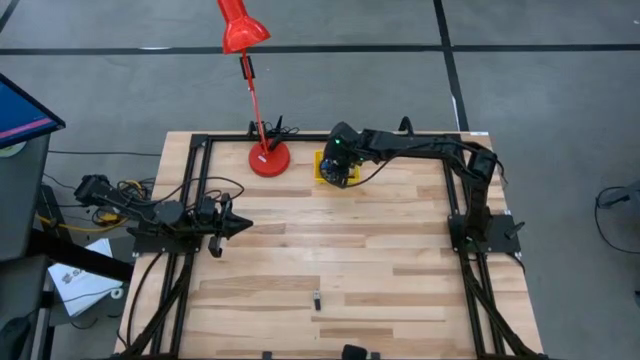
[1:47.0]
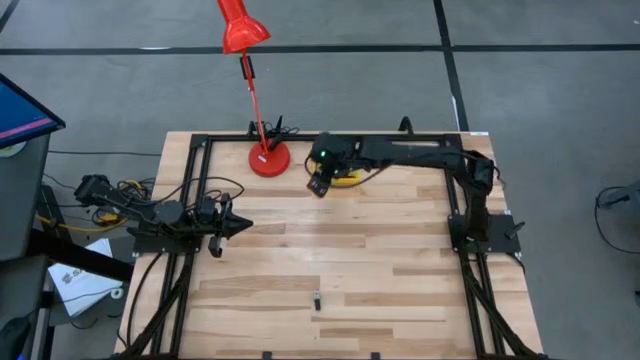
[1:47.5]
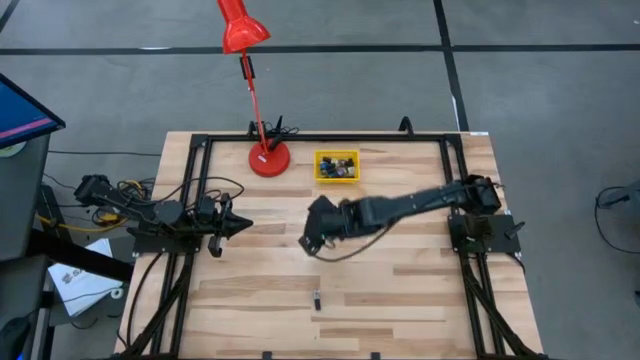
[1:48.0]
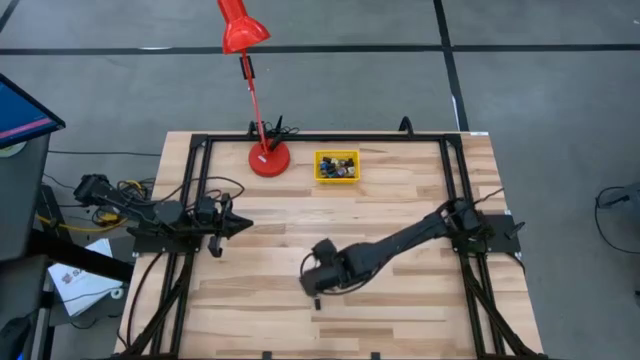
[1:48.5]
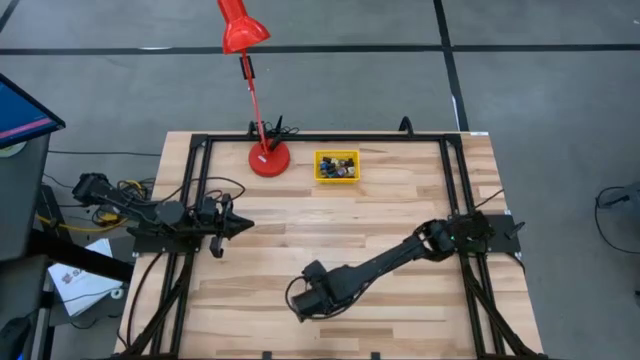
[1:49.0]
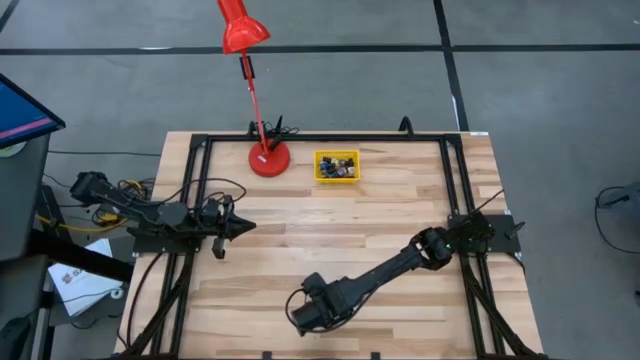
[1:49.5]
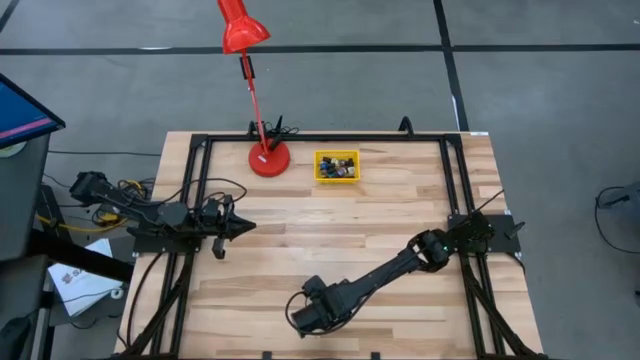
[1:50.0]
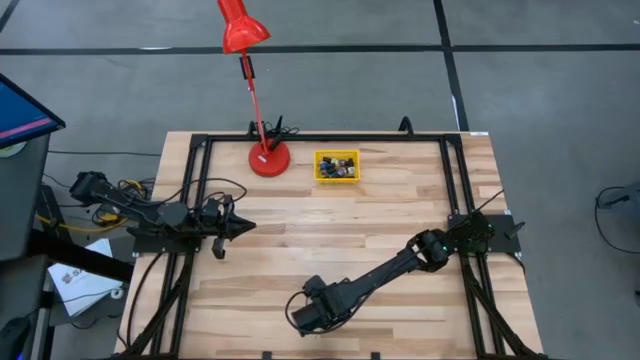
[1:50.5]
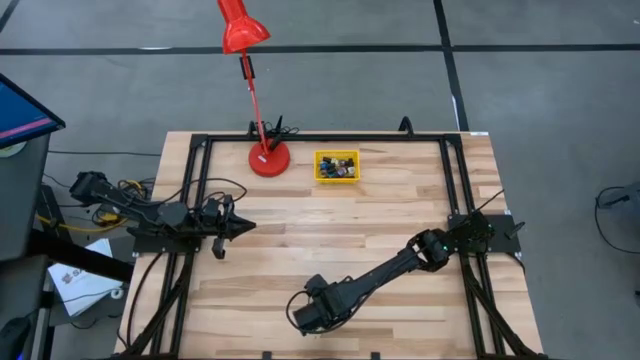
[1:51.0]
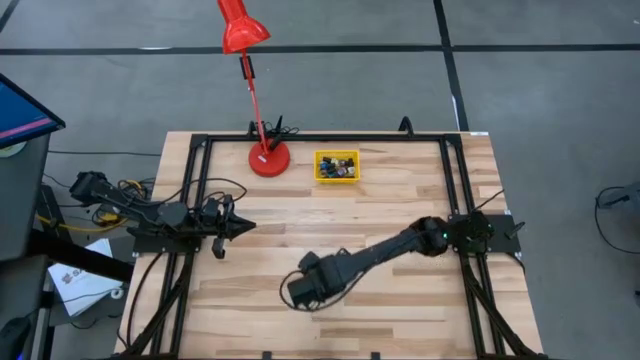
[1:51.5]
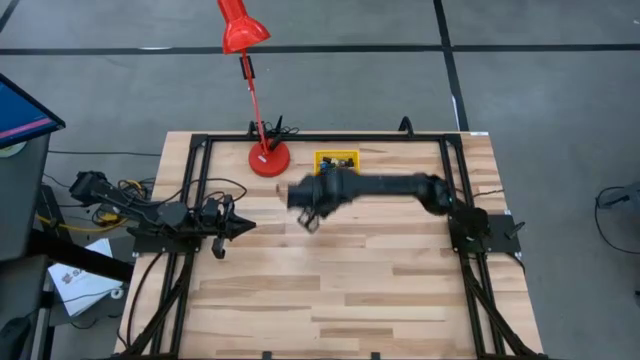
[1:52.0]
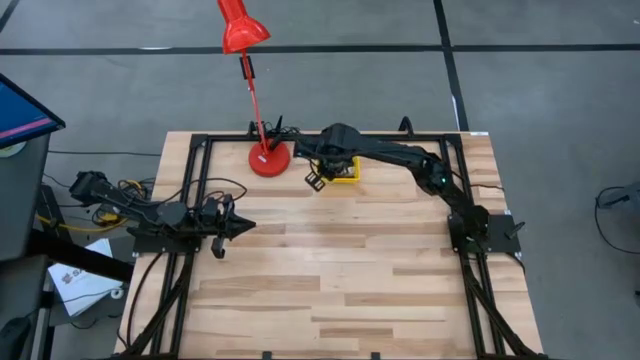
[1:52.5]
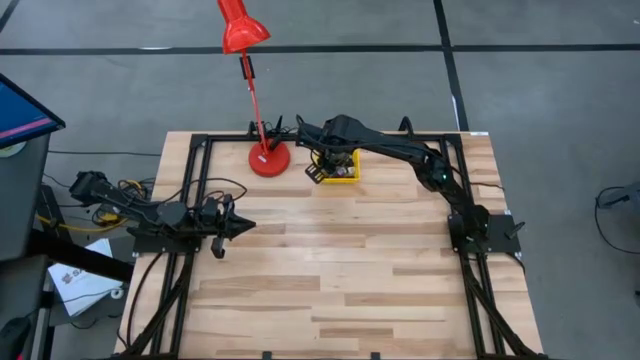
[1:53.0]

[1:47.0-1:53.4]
Task: Pick & Place Nail Polish
Put the transparent nail polish bottle into the yellow bin

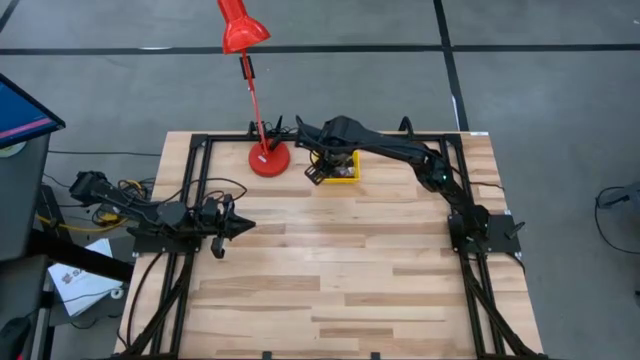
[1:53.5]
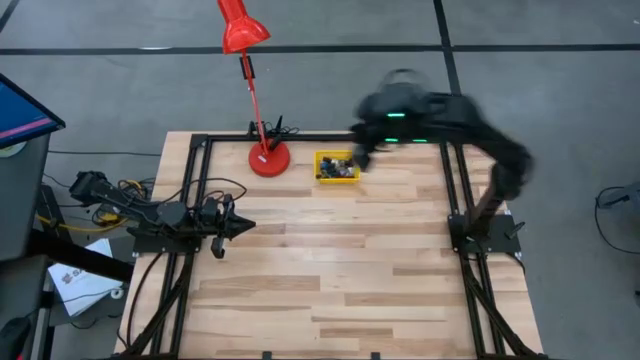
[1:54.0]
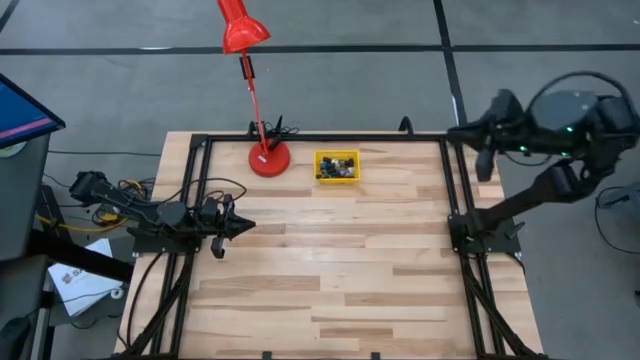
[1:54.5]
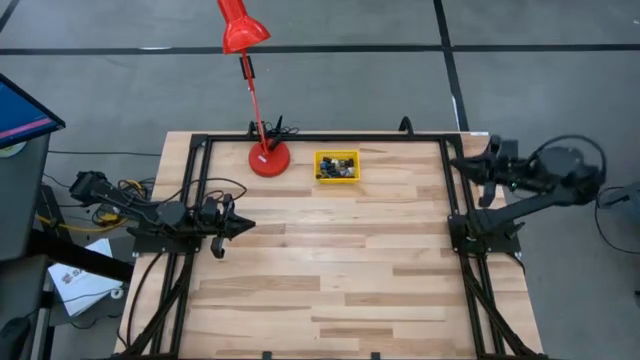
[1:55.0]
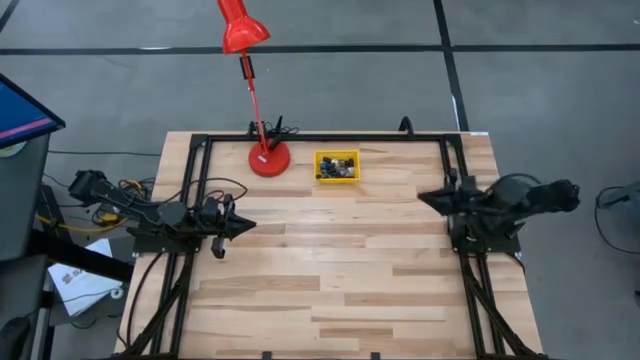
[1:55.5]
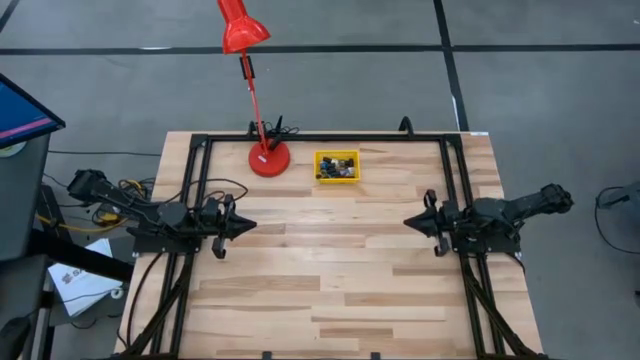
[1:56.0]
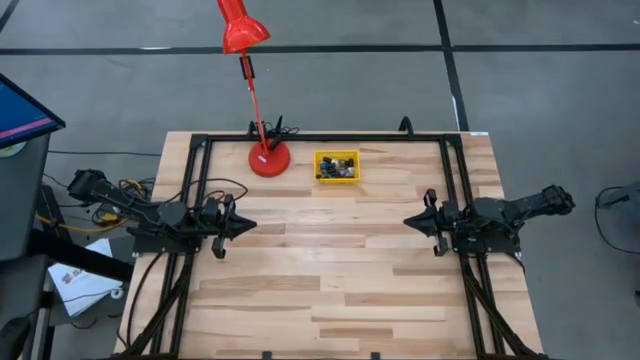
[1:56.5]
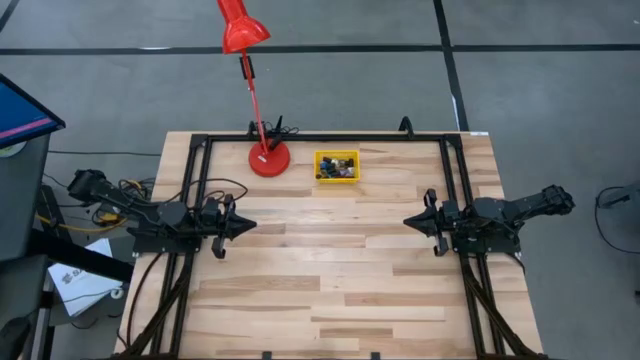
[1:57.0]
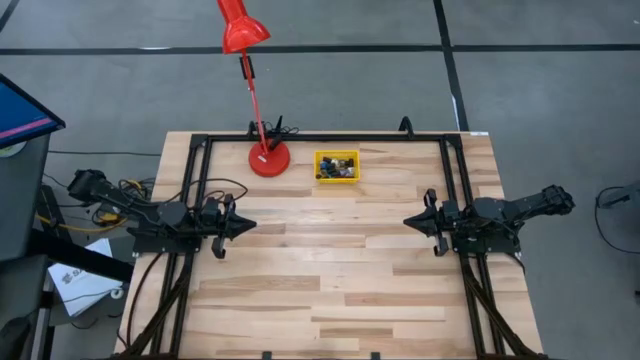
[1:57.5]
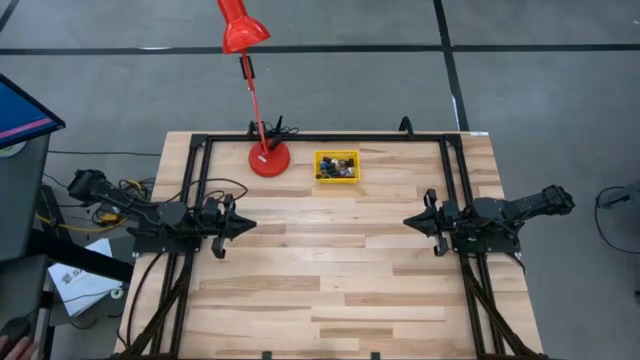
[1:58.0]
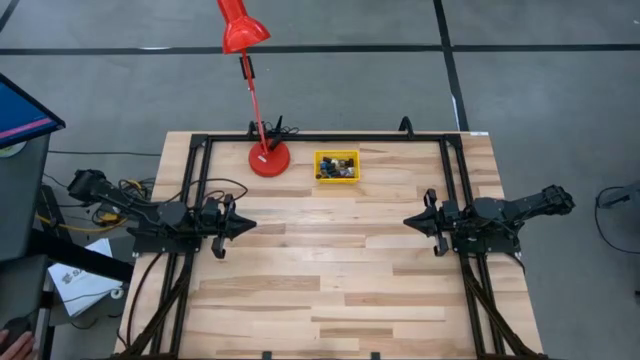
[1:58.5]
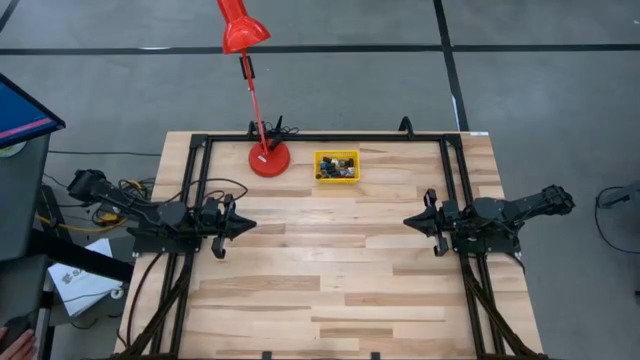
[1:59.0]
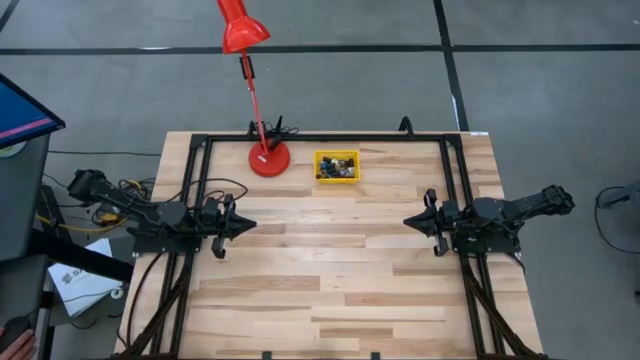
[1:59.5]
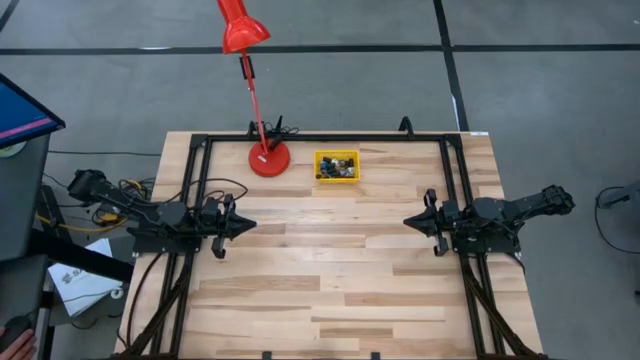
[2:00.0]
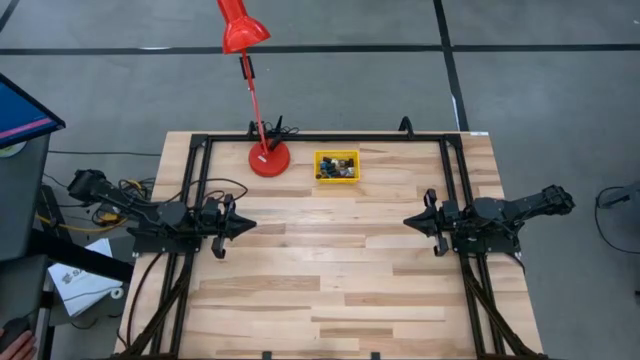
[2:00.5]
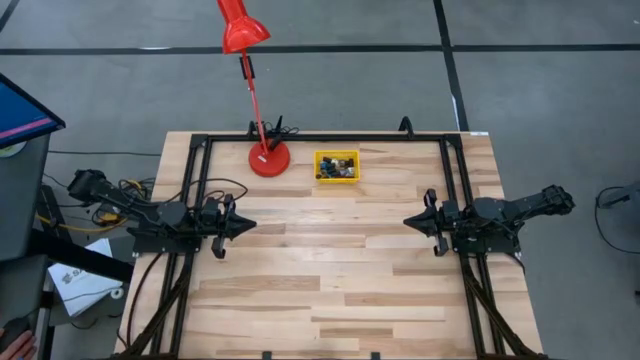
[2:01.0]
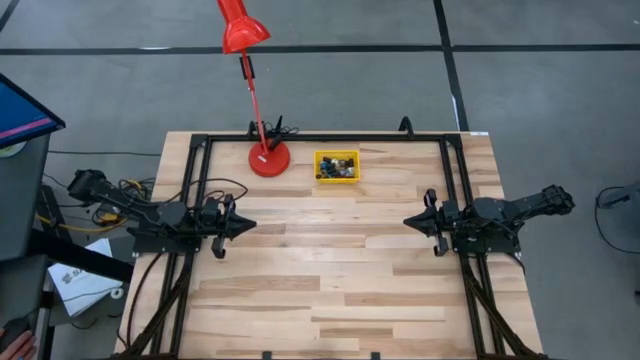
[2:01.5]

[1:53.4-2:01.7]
Return to Home Position

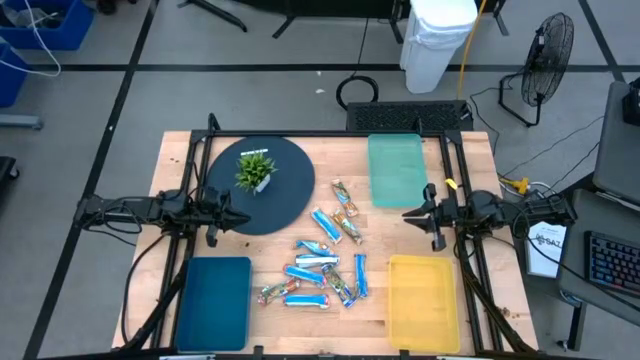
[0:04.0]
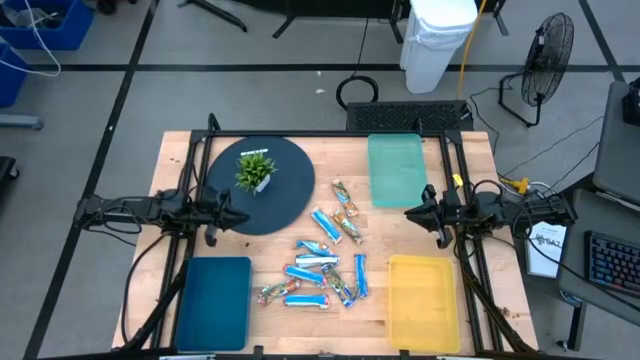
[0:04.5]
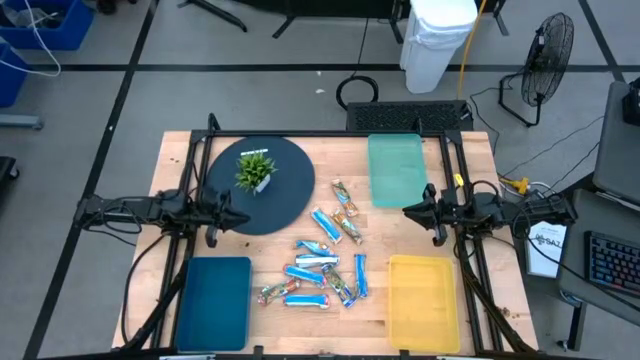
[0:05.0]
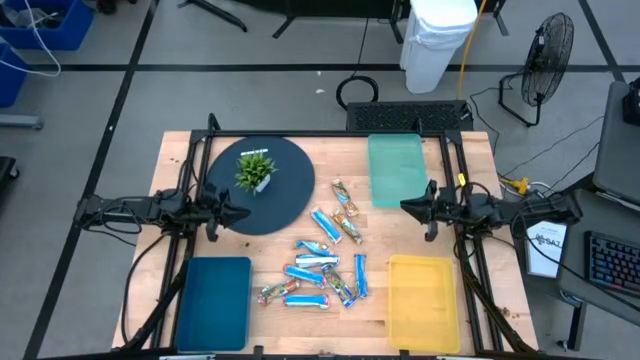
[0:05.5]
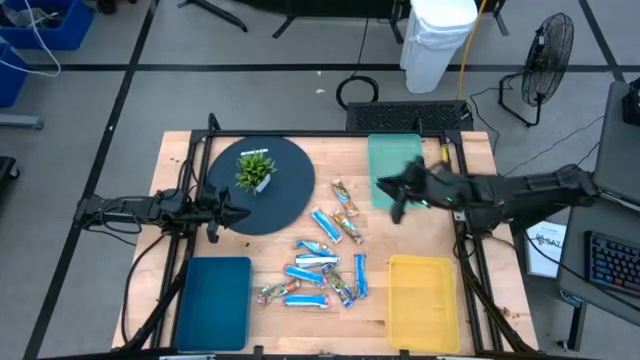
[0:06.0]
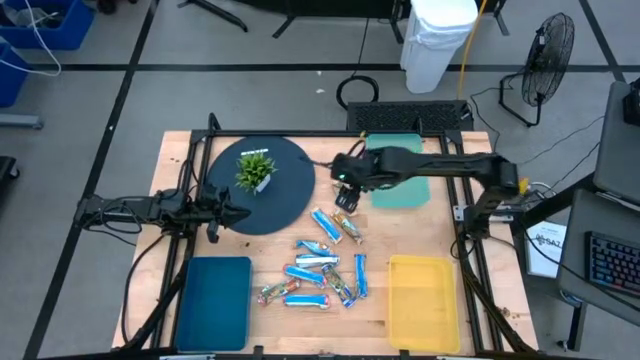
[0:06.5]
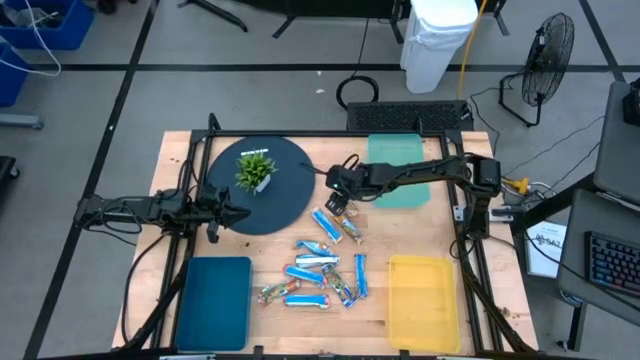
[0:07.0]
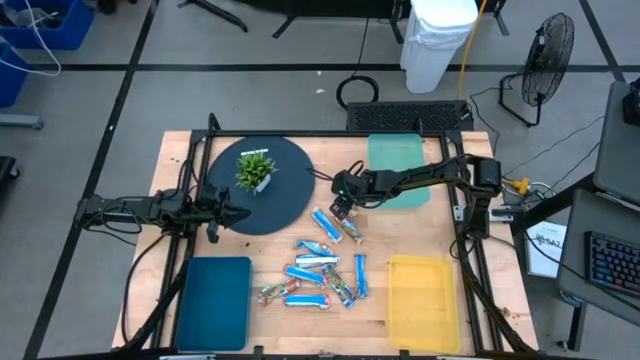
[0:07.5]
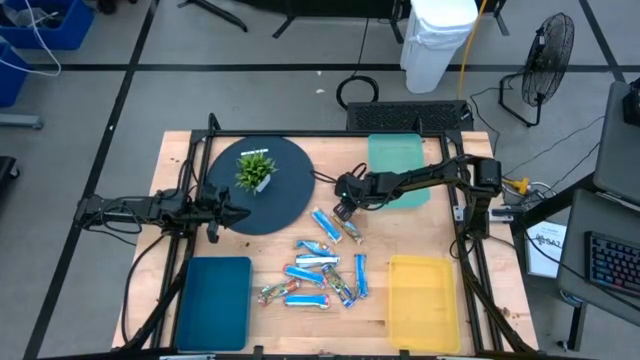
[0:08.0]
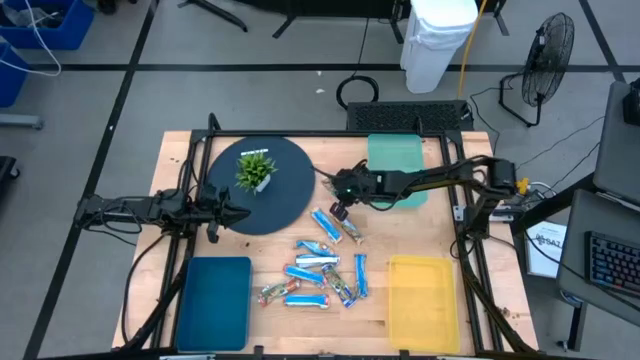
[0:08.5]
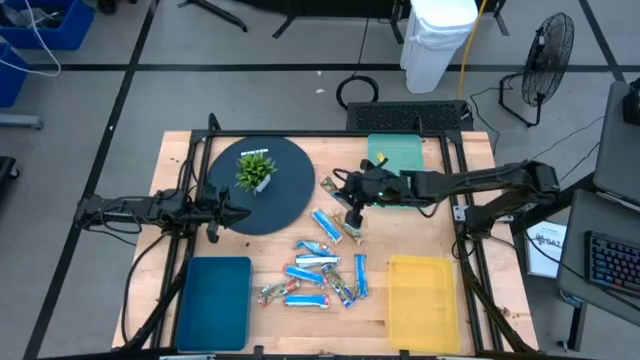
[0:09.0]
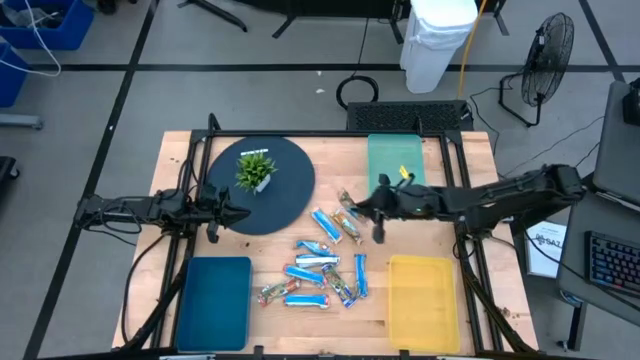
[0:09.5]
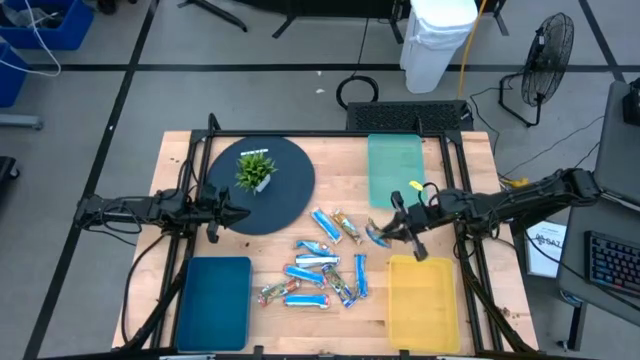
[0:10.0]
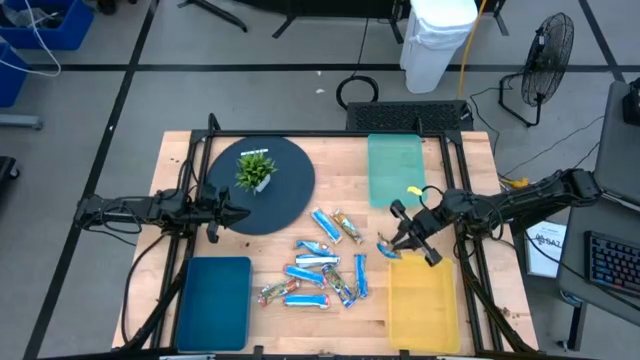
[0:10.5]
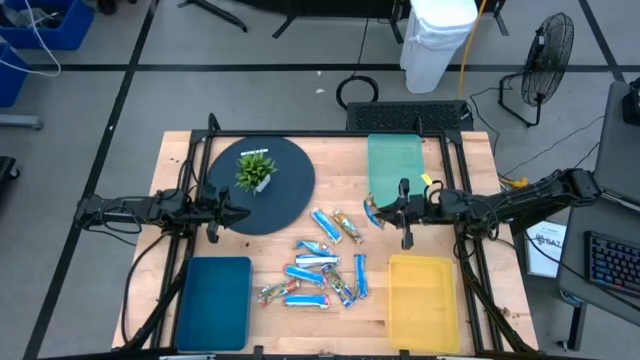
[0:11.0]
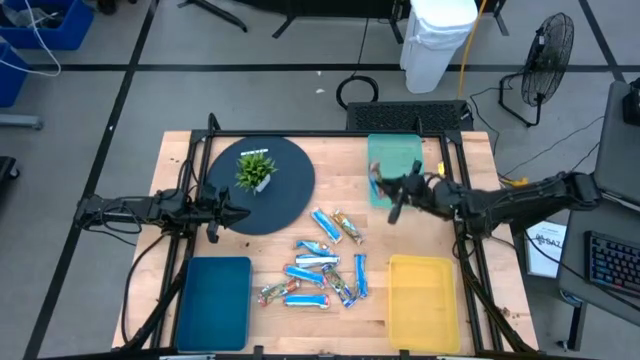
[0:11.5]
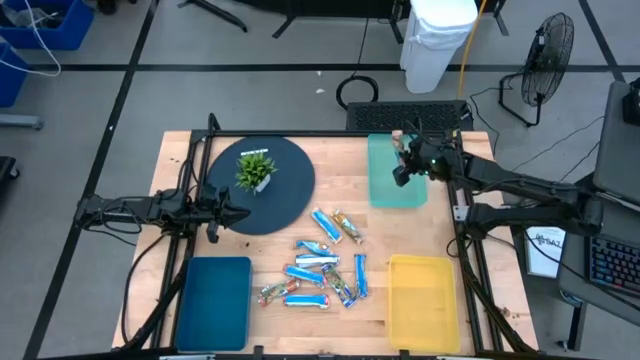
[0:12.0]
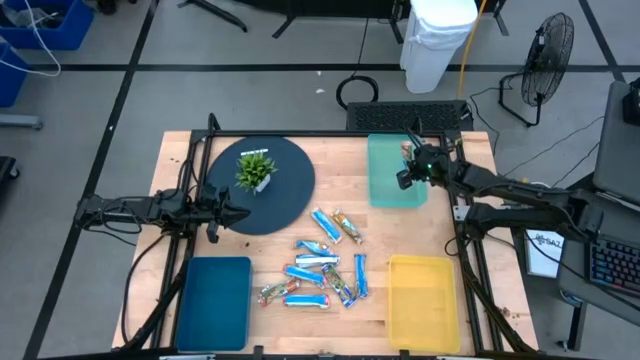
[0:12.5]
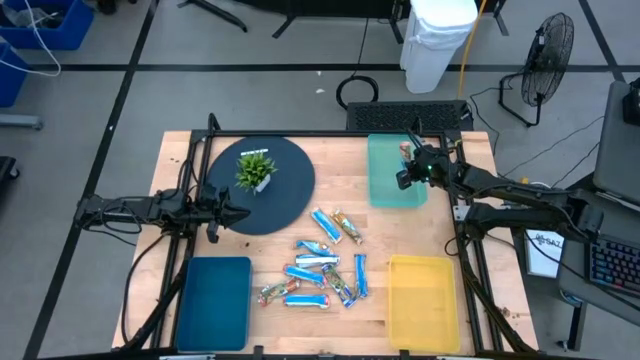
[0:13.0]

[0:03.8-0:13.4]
Task: Pick and place Granola Bars by type
Put the yellow granola bar into the green bin
